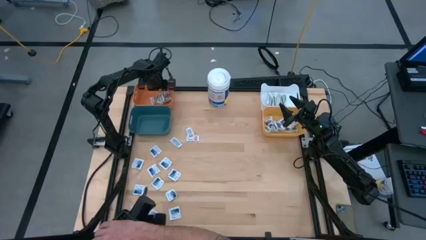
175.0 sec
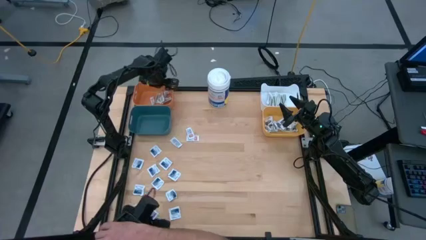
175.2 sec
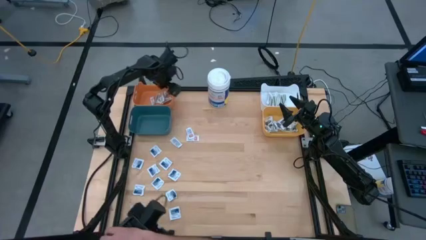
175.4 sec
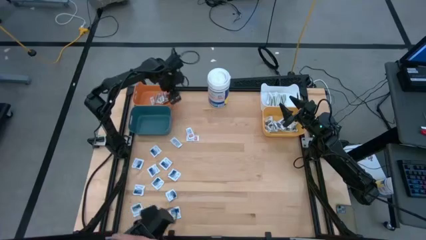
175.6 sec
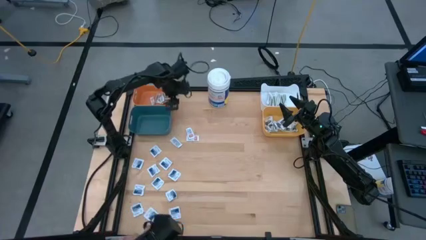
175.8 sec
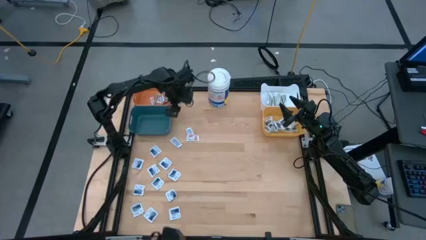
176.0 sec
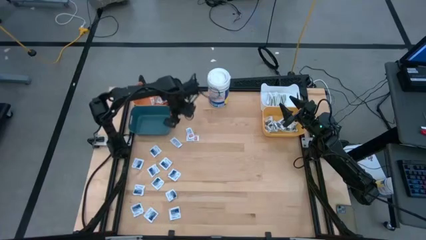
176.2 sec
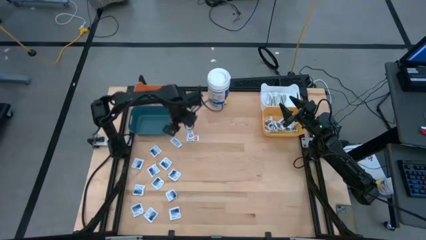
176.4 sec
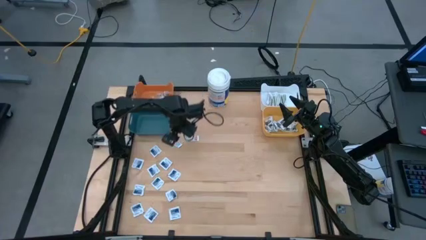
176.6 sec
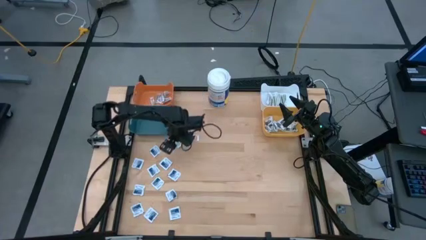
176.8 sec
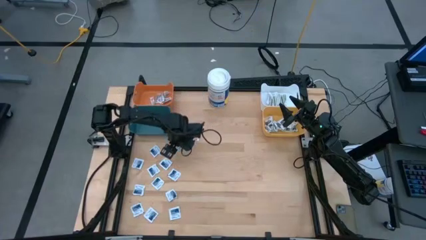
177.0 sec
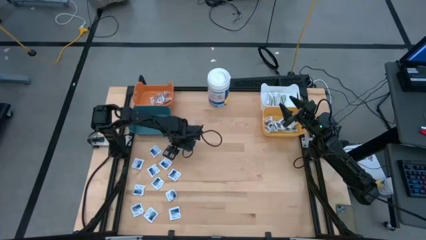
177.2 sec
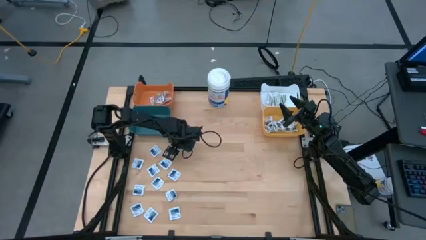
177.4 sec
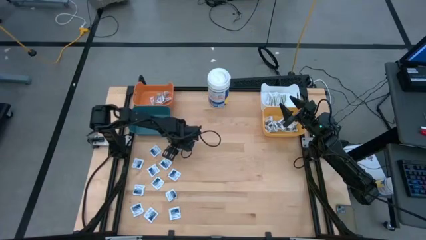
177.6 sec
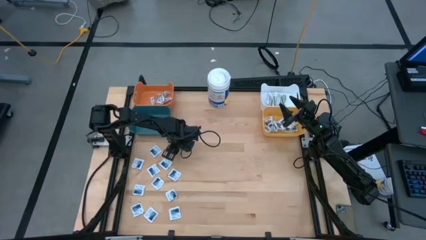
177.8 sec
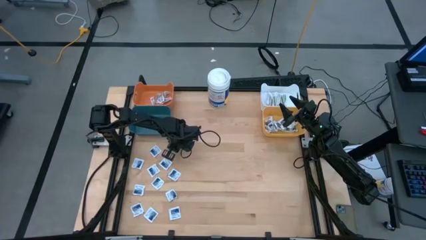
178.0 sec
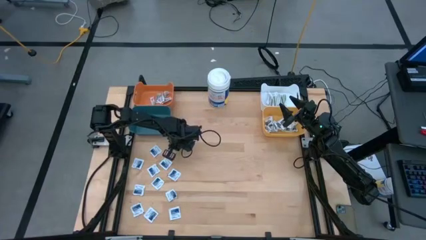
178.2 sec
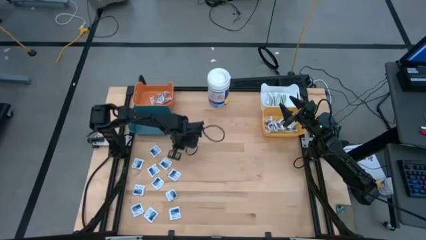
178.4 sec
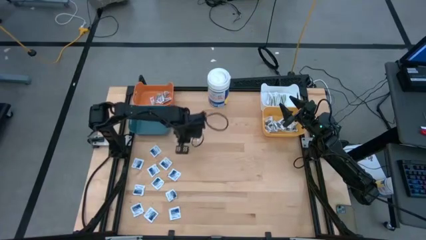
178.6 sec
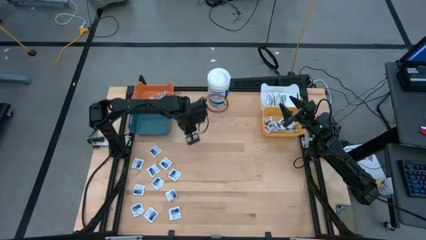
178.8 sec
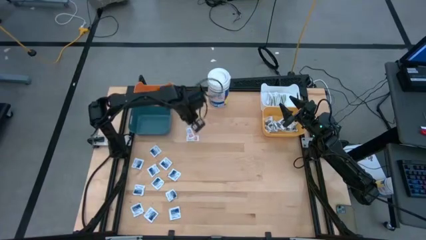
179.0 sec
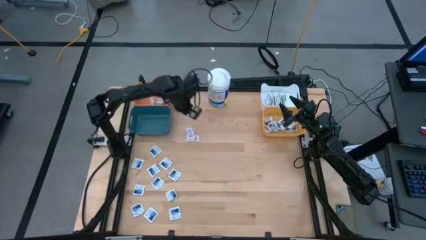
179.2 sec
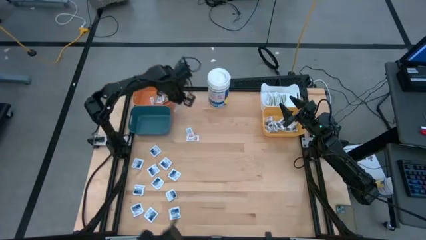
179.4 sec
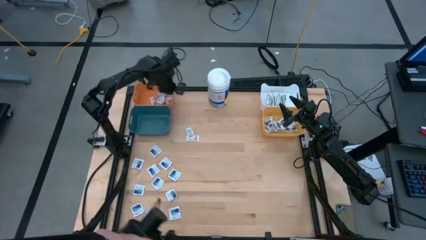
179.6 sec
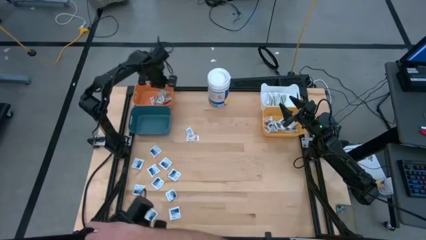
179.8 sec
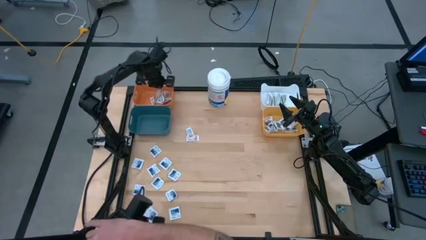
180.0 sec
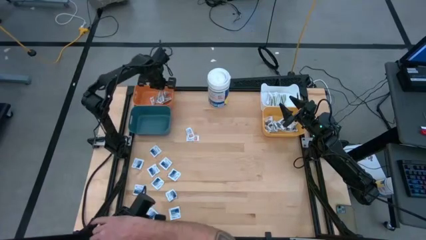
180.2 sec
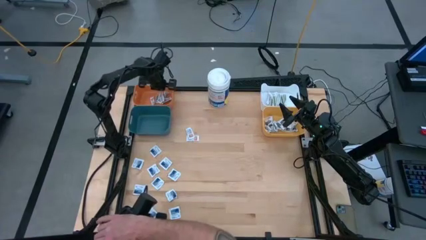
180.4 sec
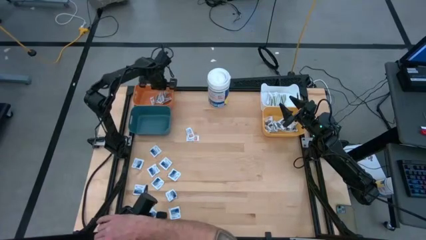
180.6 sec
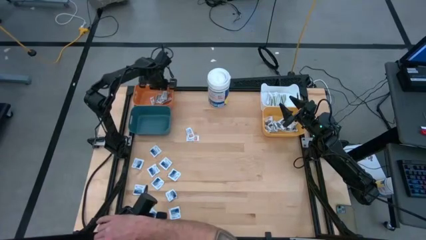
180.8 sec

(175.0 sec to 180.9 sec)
Task: Pick & Place First Aid Supplies
Put the orange pad into the orange bin

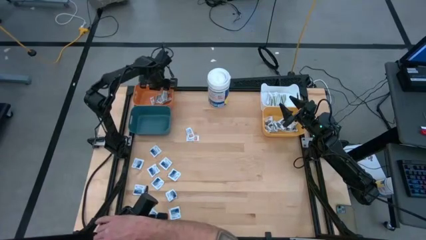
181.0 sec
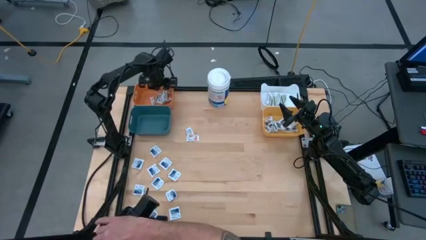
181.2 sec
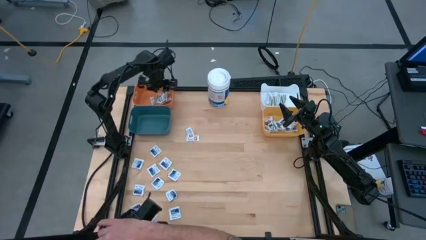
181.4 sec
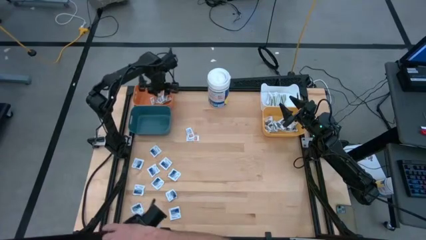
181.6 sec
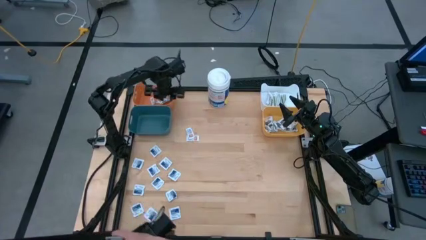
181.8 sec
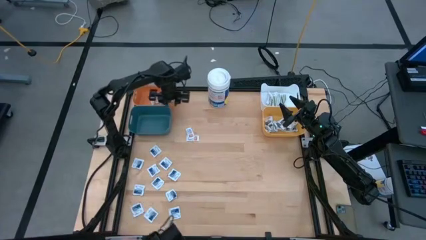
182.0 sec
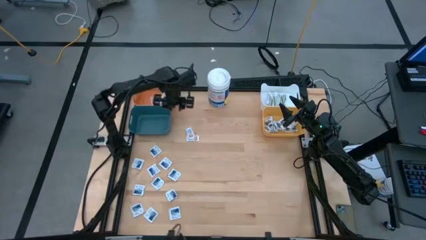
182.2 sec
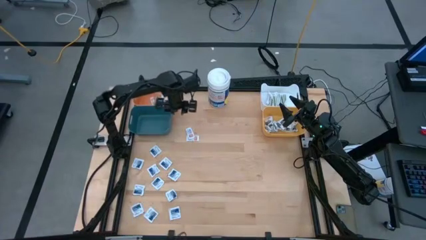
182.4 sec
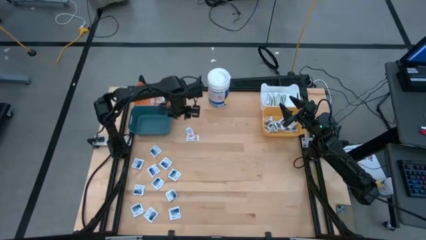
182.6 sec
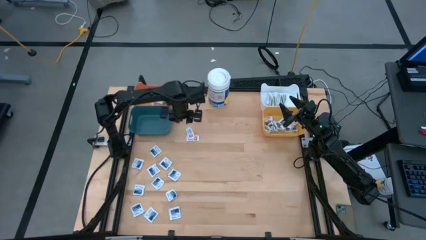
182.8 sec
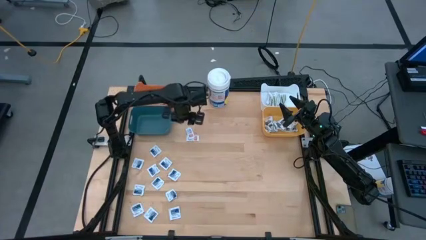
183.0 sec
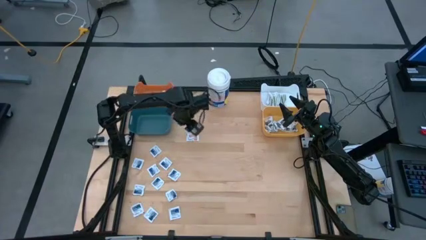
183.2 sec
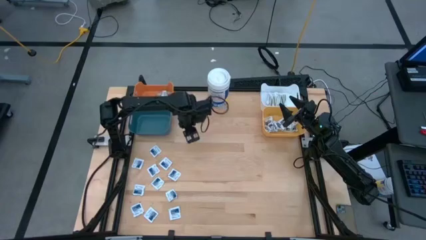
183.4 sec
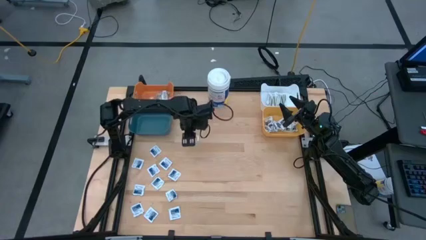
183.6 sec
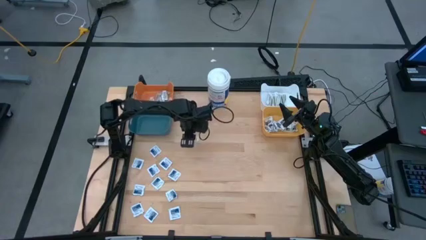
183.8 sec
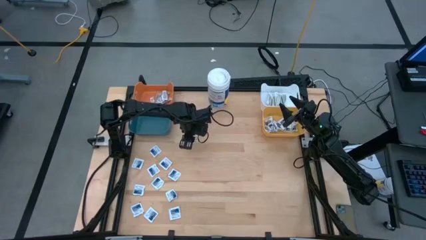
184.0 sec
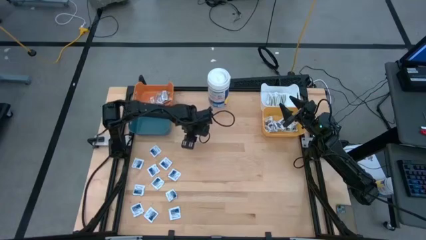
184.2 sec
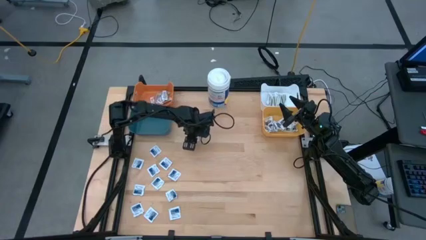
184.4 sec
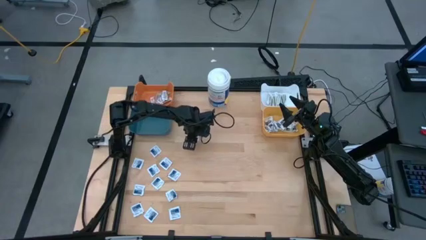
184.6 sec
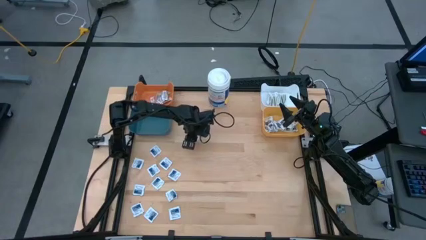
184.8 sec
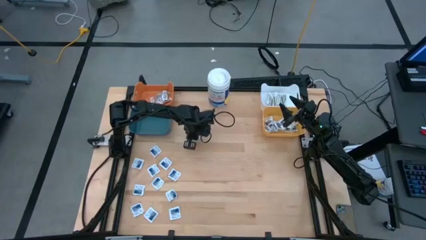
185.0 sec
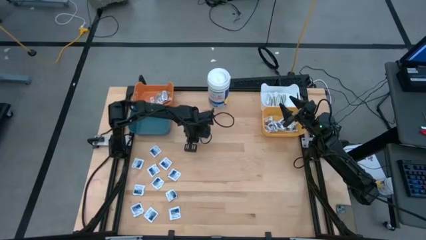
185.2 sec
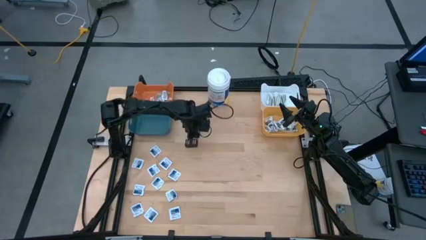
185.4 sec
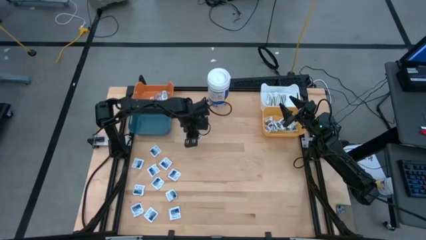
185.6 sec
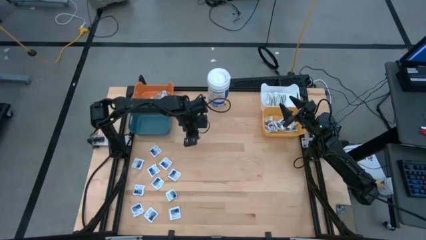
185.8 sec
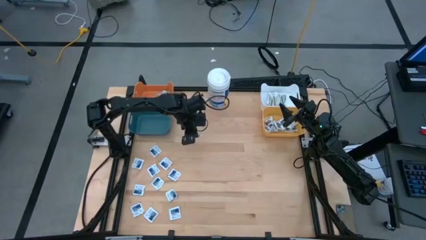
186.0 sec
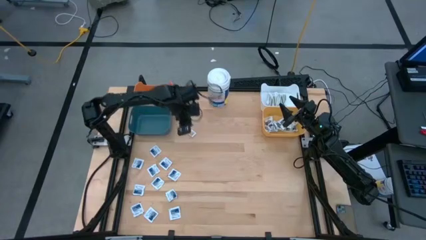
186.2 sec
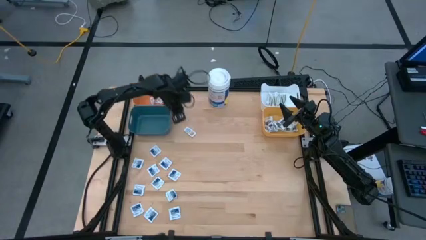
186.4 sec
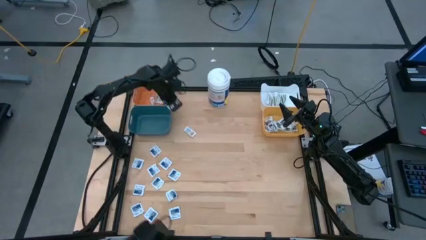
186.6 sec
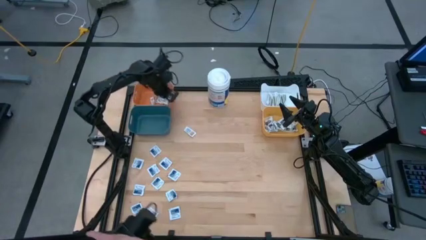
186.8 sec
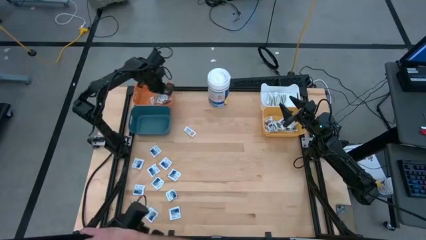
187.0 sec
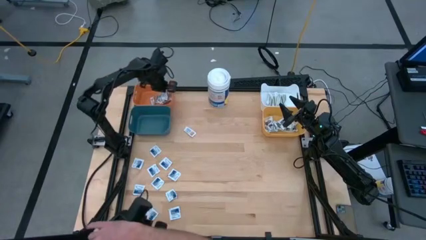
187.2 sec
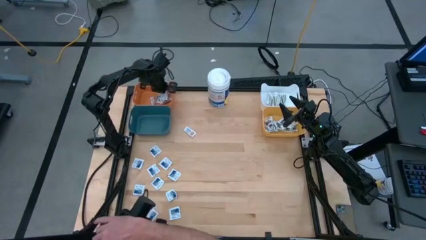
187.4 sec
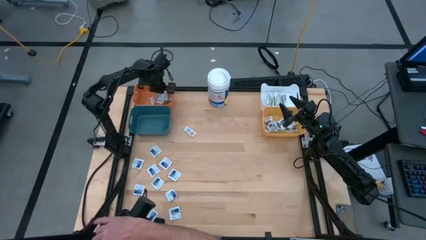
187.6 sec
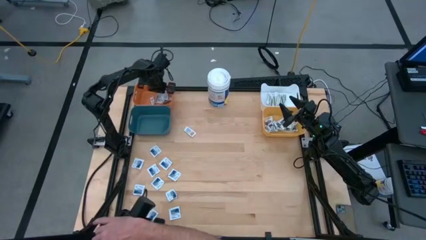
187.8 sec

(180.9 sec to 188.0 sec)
Put the orange pad into the orange bin

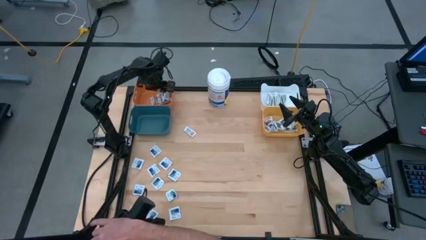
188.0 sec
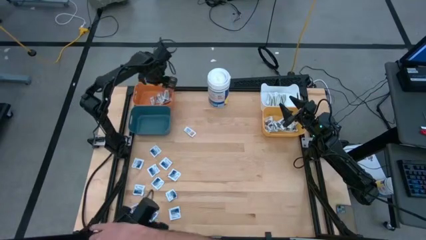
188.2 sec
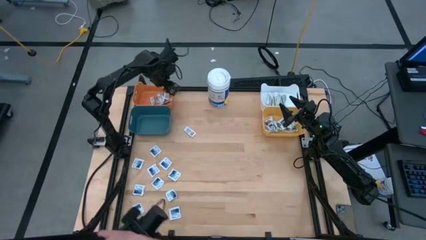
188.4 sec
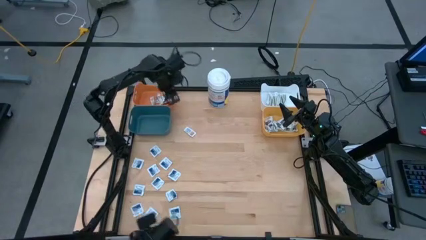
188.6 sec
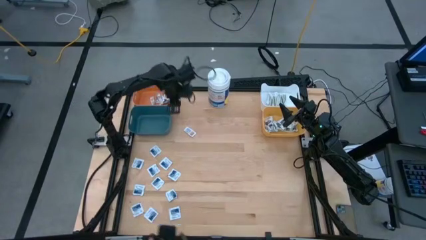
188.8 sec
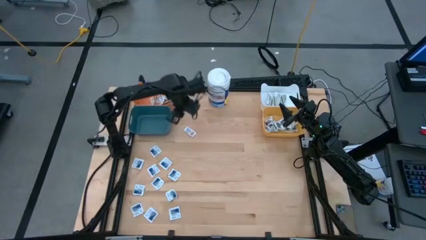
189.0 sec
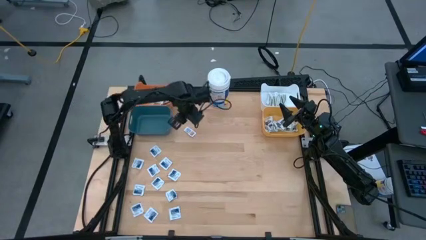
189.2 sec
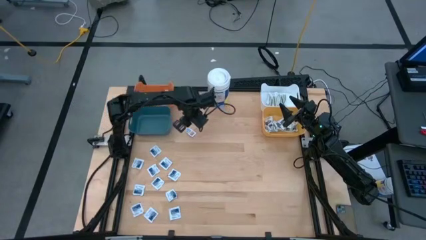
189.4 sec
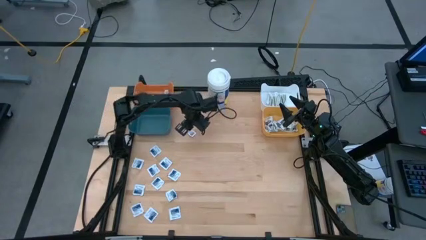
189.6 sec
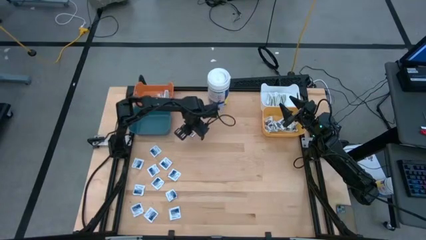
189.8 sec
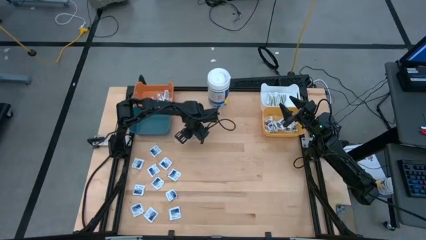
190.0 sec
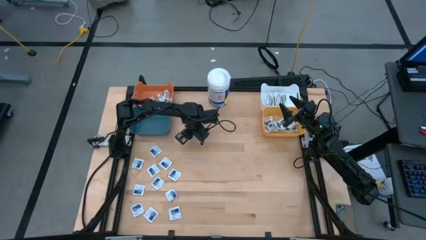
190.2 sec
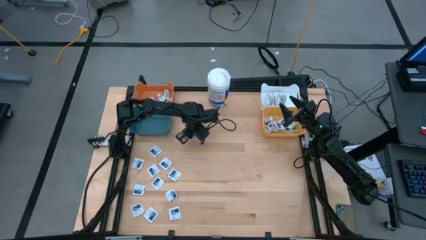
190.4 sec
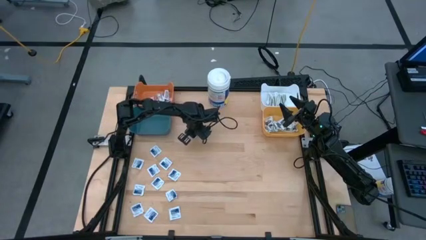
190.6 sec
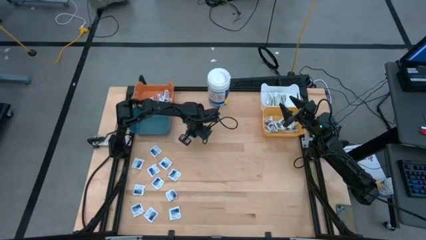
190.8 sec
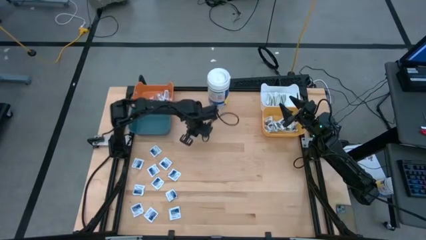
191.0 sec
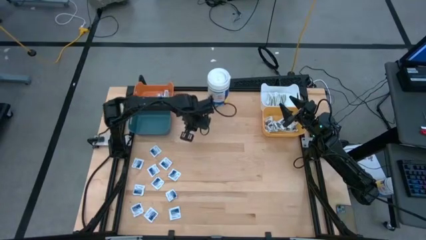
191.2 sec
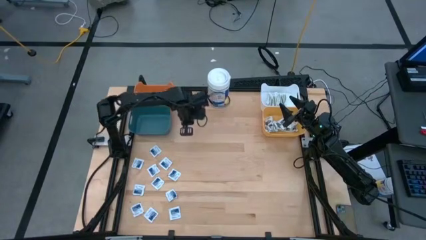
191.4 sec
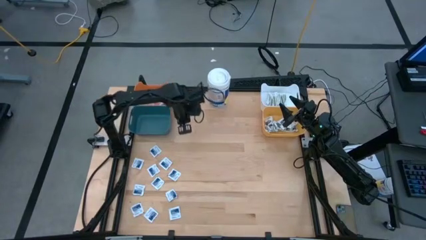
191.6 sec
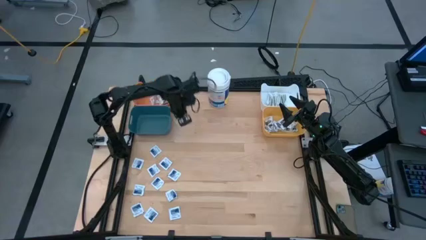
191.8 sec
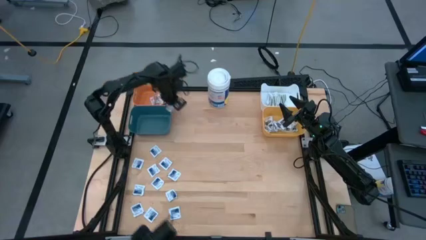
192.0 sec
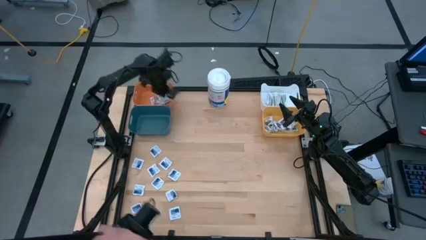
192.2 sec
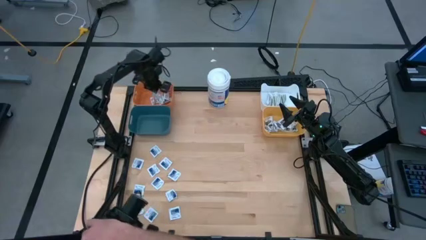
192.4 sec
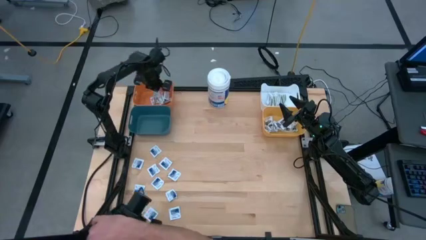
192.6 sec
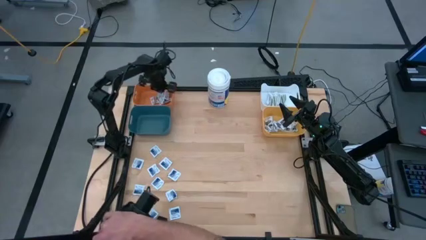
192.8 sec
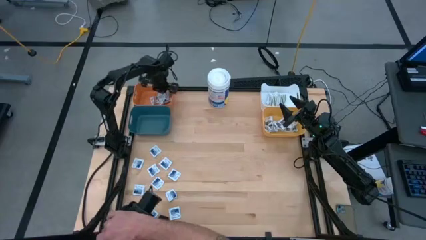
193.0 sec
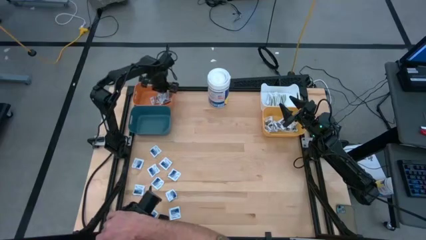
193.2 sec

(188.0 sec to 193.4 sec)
Put the orange pad into the orange bin
